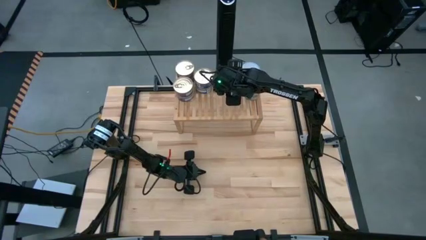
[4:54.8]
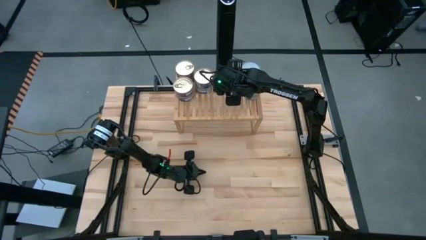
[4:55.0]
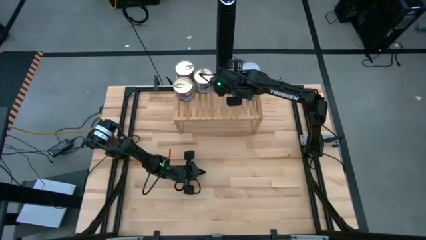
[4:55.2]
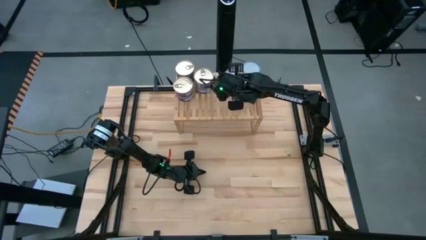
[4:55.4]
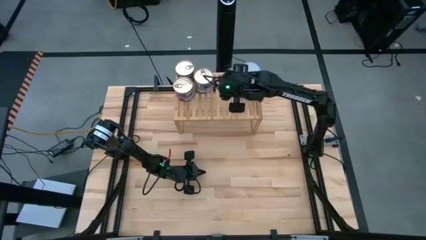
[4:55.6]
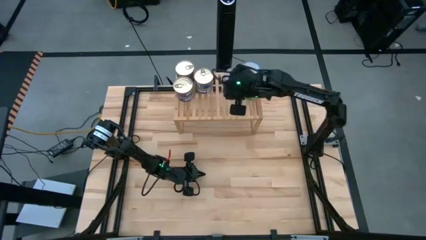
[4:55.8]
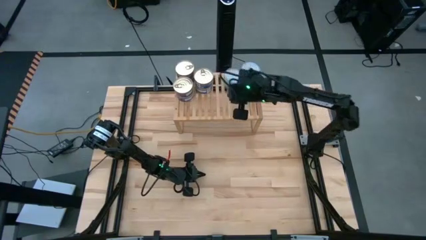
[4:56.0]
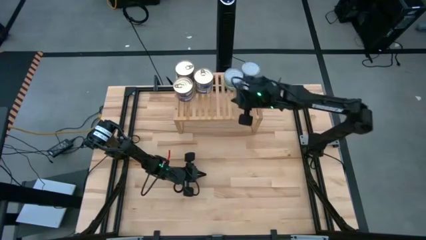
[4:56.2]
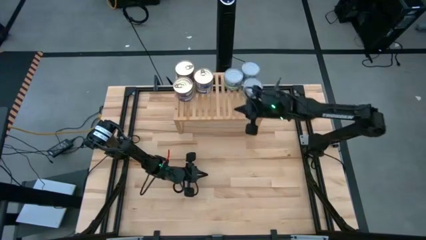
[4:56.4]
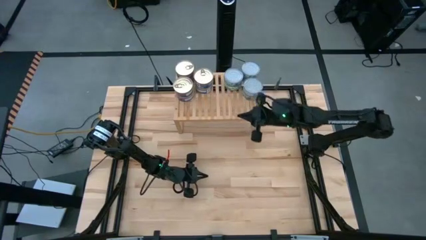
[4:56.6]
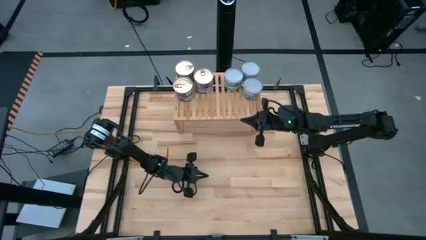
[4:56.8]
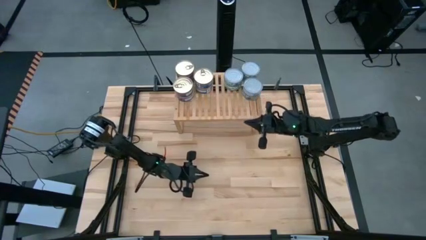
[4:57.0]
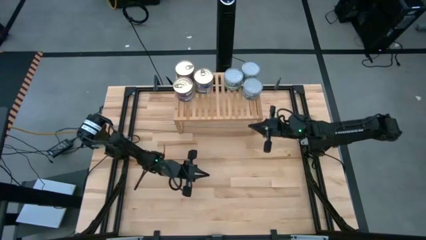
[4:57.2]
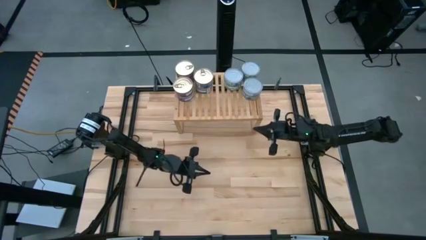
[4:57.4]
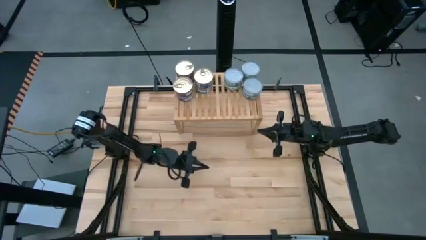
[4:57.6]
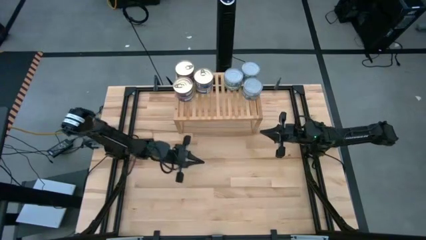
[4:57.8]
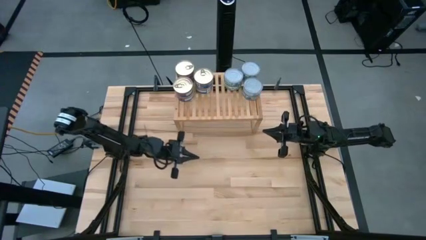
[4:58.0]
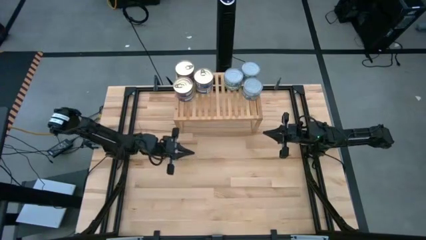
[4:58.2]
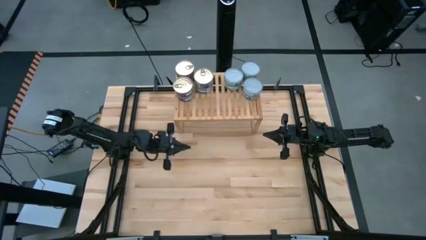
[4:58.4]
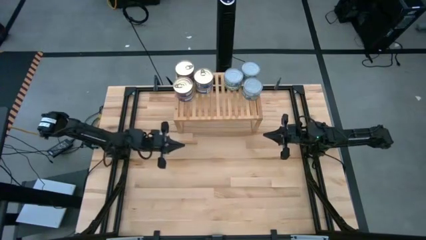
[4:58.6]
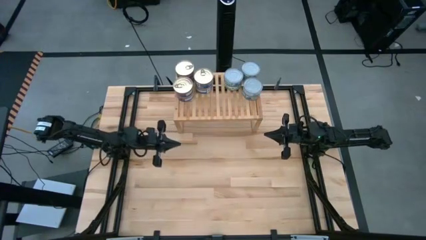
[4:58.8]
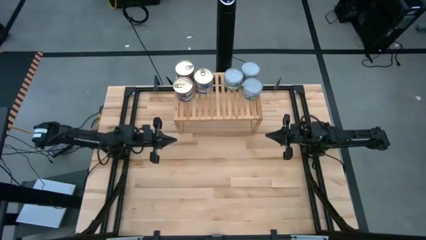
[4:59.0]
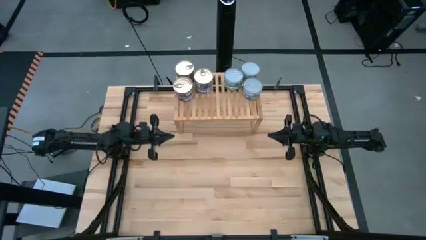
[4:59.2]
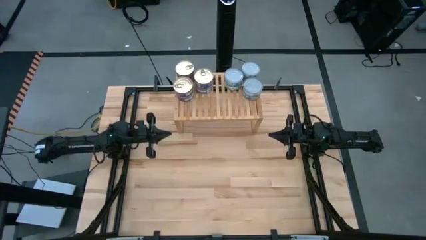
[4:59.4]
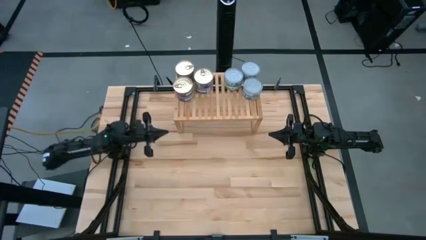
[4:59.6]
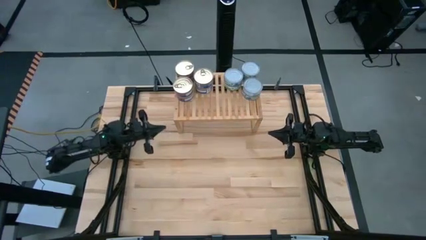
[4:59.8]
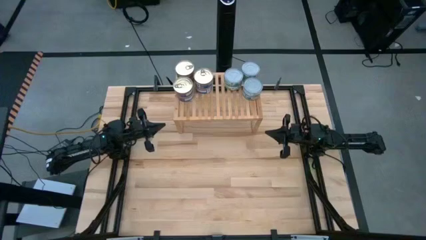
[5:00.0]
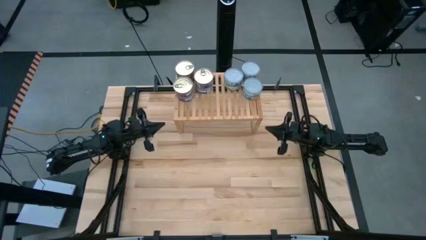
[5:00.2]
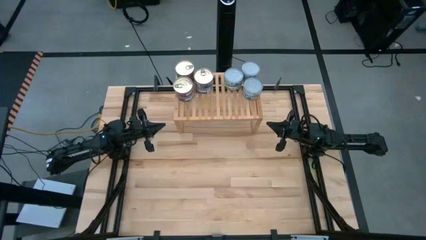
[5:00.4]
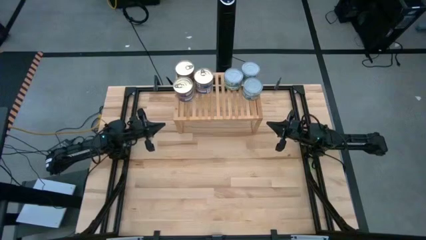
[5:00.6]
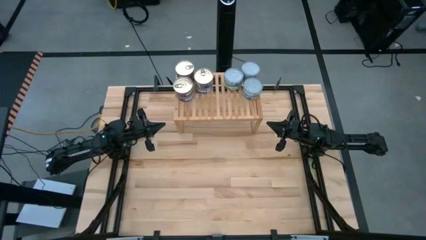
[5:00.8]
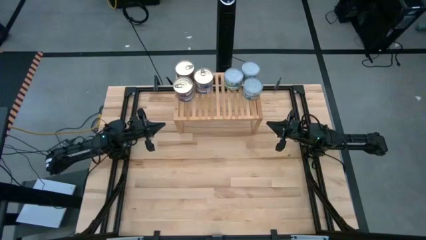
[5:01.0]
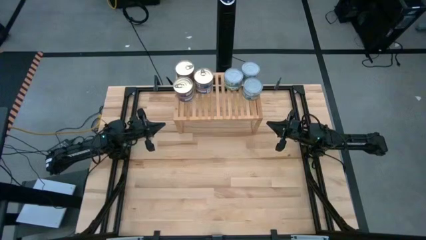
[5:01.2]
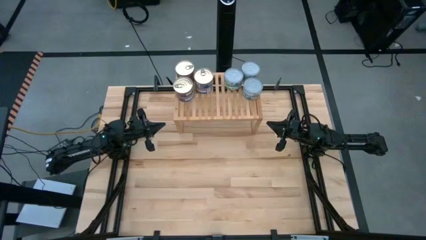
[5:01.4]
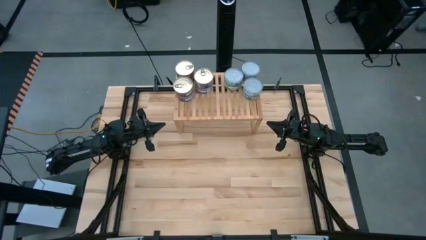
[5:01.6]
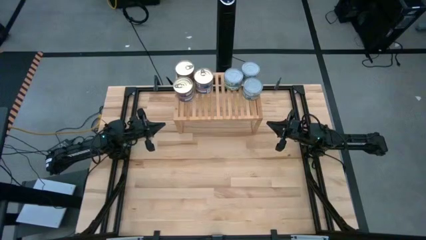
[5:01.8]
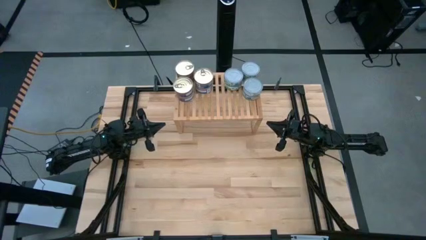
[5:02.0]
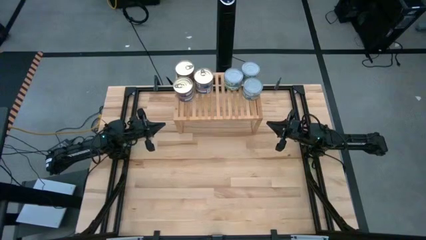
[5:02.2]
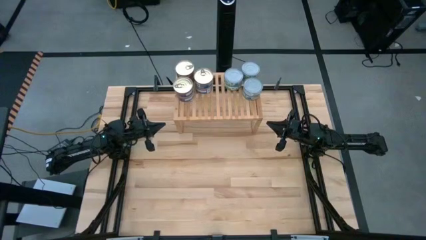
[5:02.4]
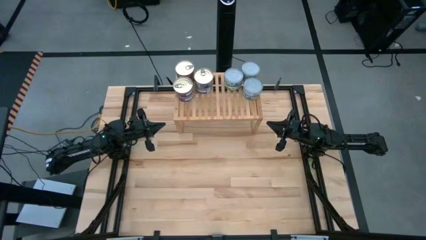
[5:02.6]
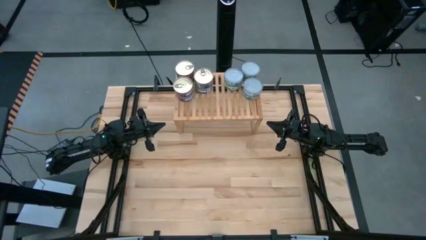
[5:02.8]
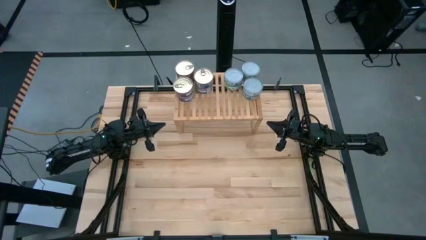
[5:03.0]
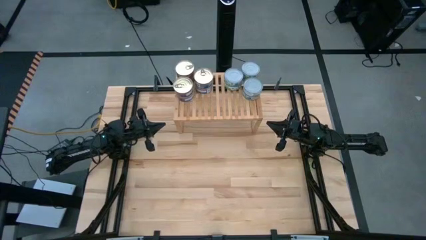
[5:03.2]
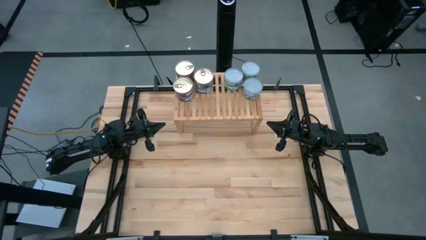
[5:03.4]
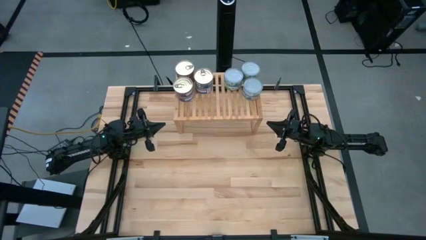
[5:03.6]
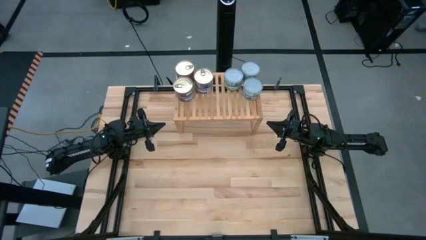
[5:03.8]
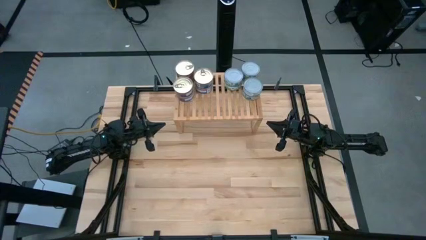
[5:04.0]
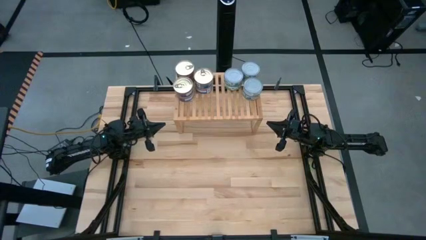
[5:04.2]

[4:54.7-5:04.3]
Task: Stack canned seafood by type on shelf
Return to Home Position

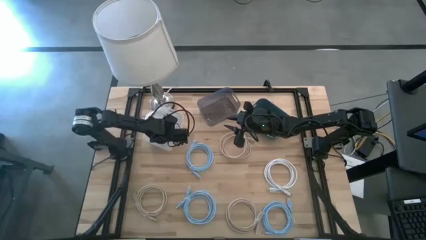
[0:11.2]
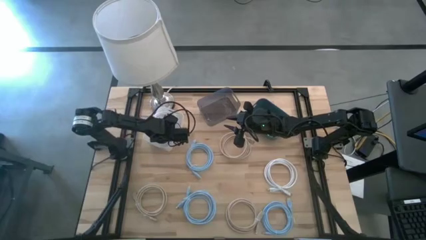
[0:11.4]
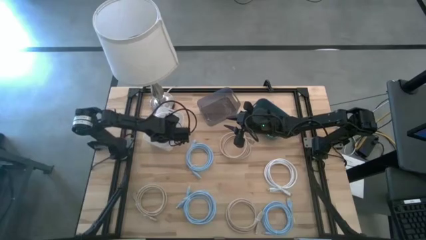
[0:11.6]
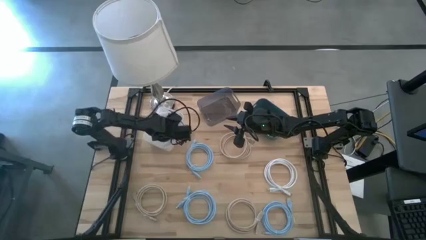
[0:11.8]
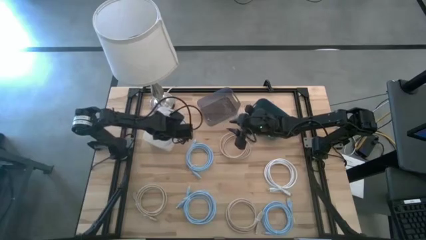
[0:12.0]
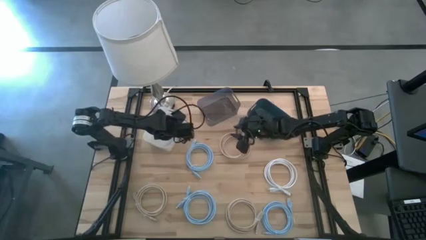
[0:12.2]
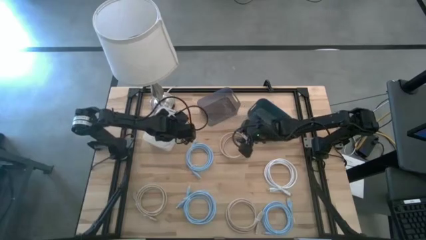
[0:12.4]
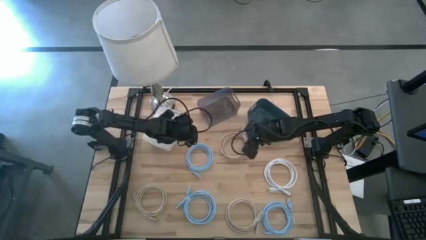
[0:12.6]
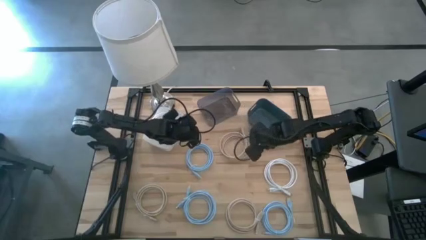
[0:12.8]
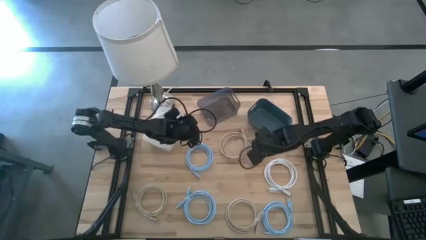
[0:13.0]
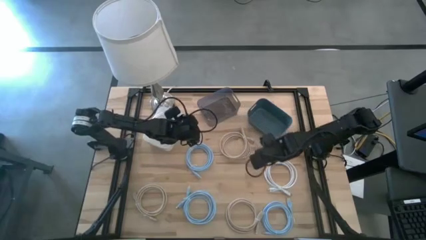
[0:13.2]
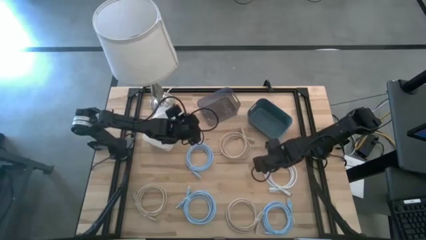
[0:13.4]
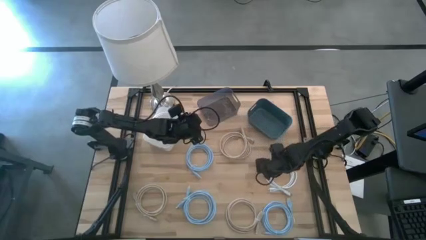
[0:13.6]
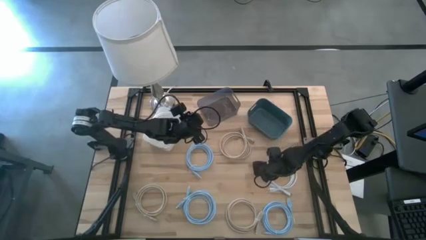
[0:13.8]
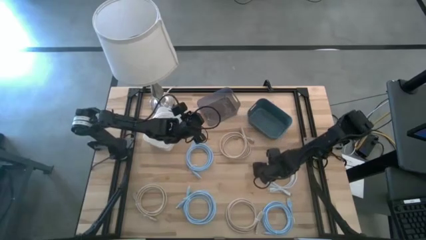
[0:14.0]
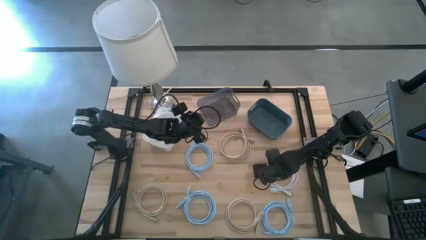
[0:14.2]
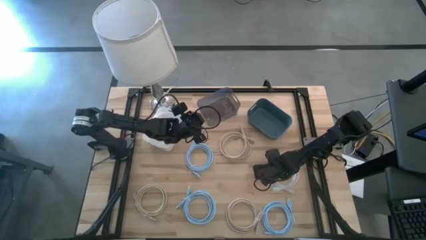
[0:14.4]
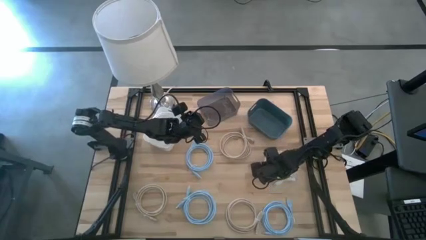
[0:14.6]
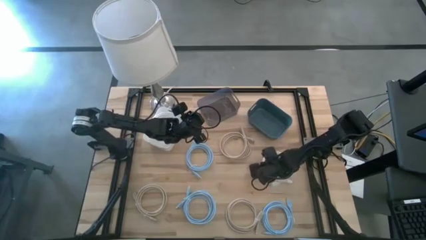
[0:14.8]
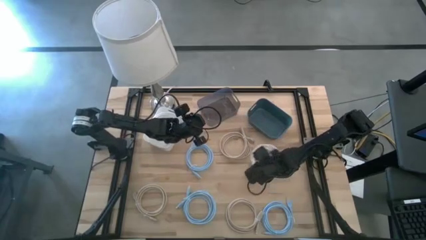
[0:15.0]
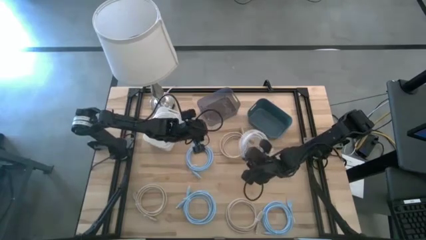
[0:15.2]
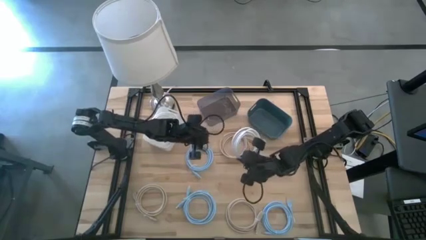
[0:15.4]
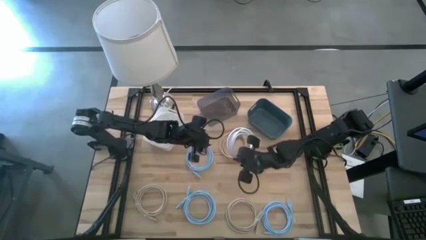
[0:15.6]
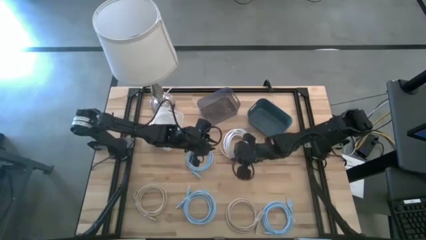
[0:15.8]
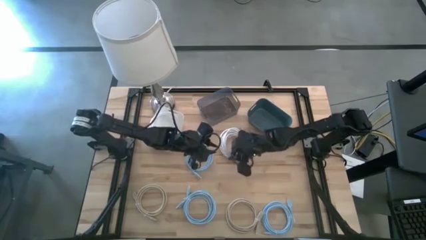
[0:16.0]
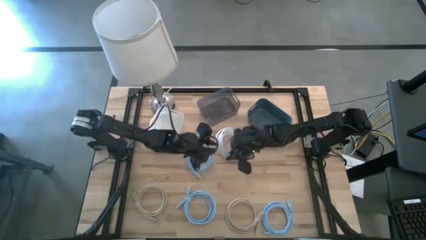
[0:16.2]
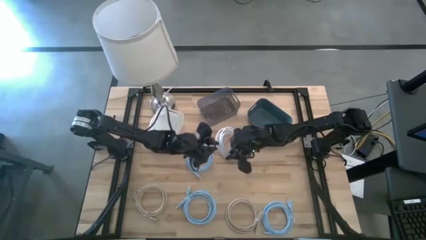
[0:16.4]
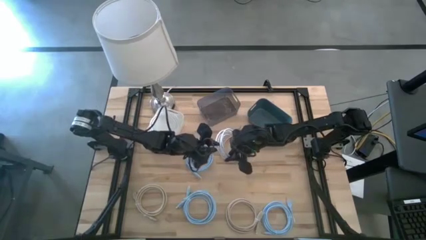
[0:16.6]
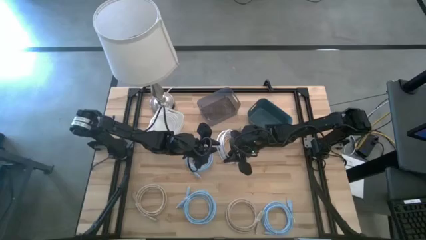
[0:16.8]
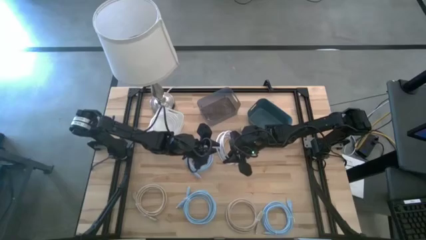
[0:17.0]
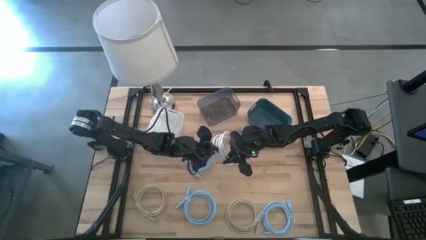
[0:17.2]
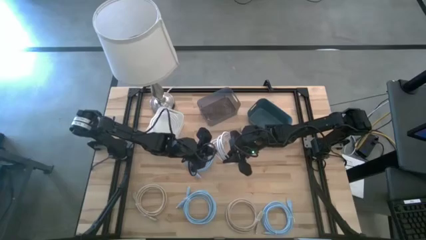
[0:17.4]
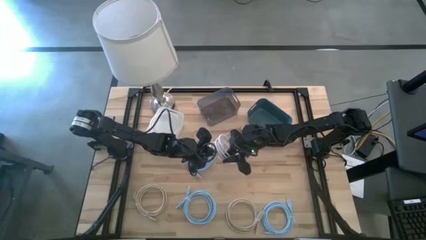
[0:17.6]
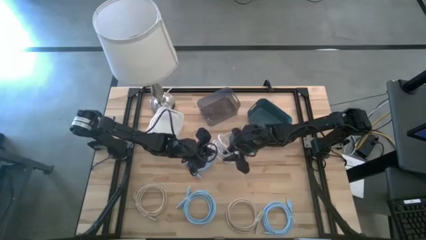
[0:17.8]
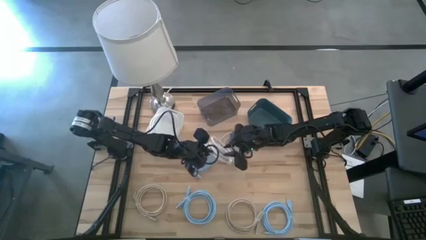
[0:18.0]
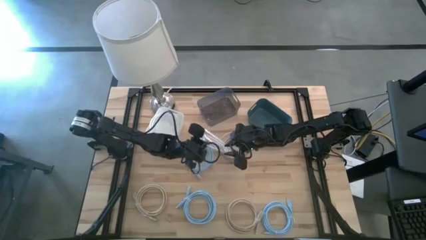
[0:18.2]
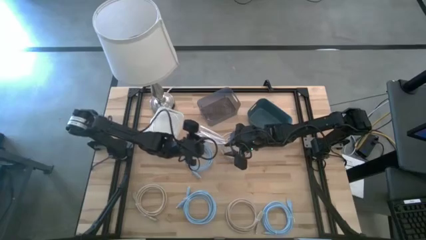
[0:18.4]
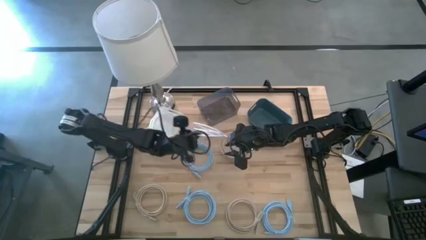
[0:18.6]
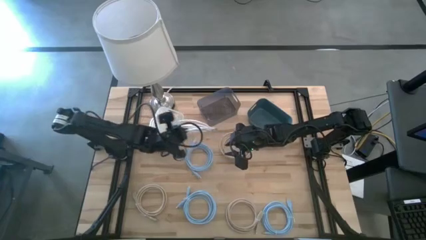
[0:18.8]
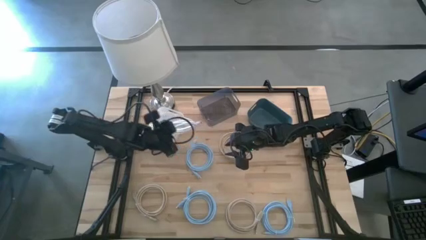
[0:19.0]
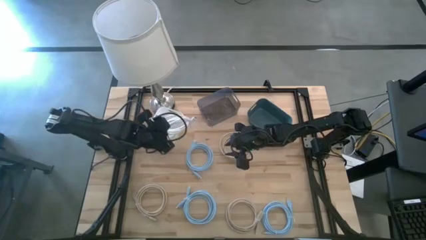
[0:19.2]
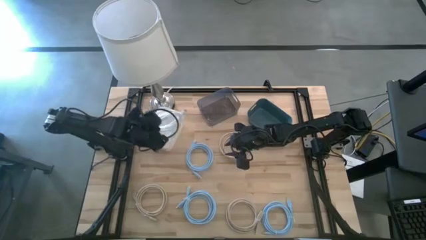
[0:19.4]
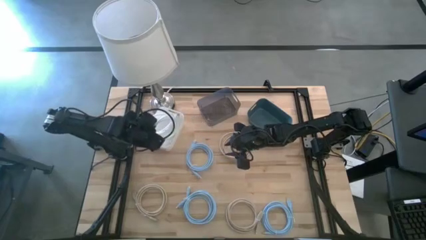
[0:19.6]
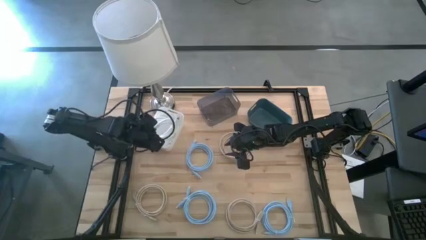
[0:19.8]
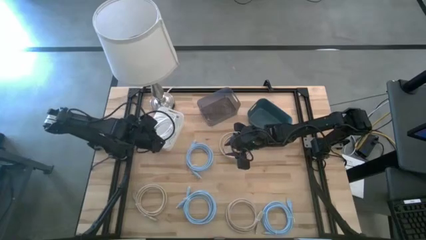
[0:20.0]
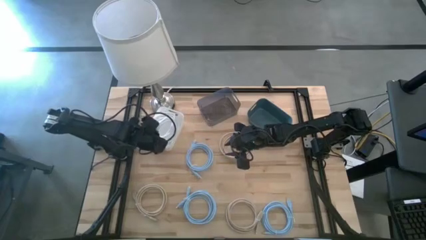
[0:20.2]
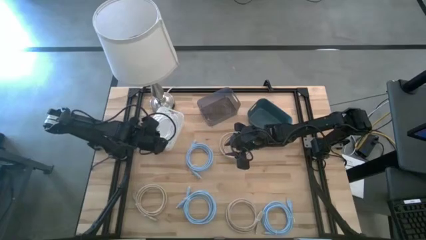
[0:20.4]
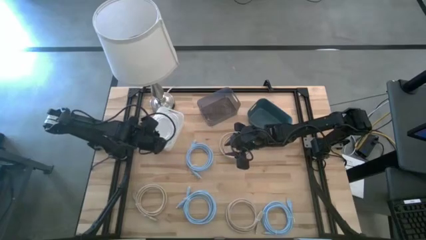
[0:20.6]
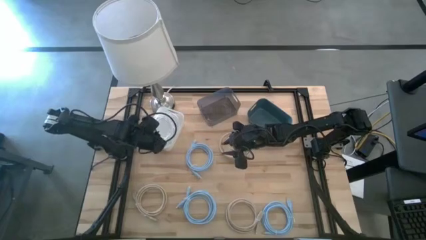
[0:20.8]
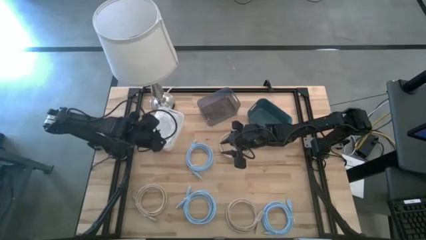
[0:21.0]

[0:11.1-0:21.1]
Task: Sort HDMI cables
Put the white HDMI cable into the white bin
